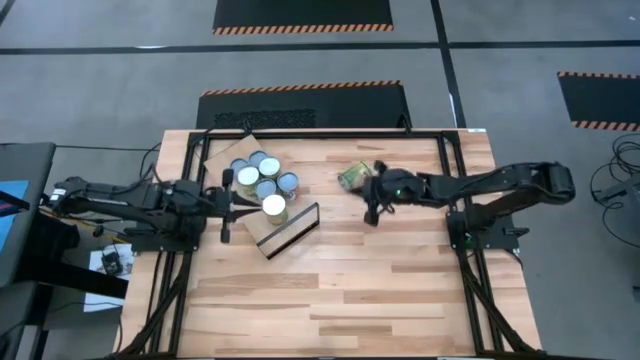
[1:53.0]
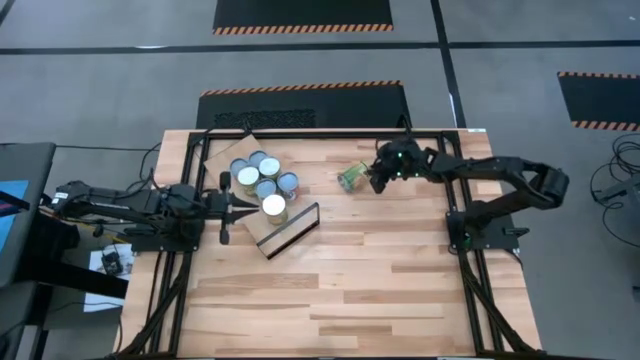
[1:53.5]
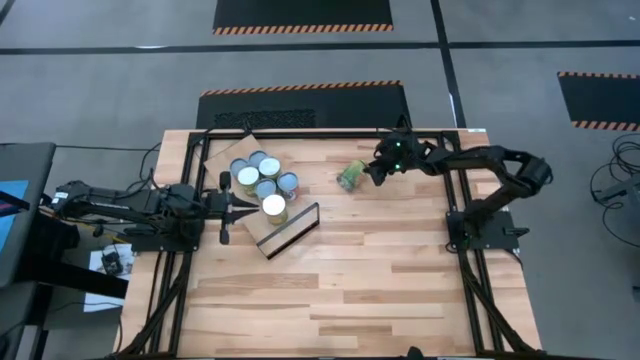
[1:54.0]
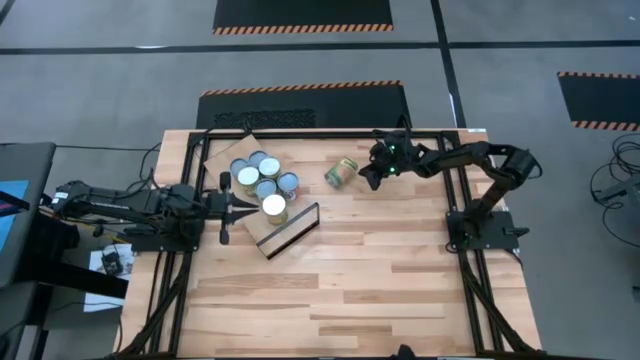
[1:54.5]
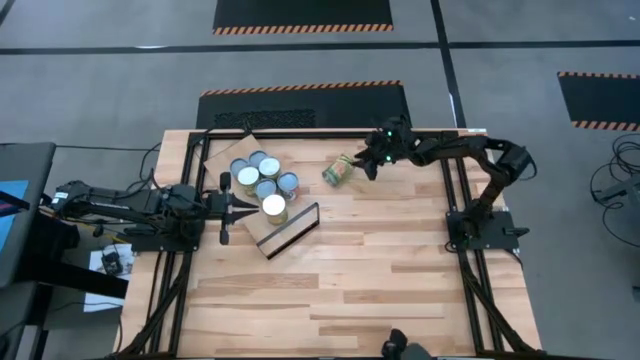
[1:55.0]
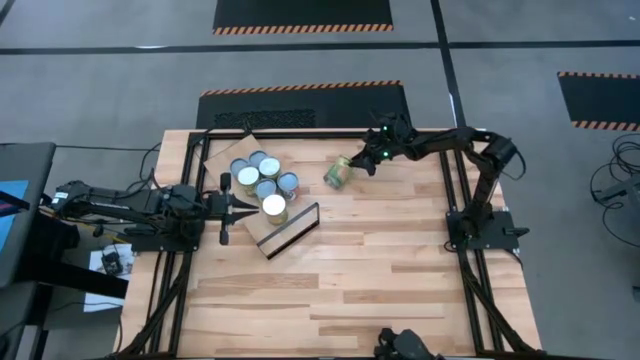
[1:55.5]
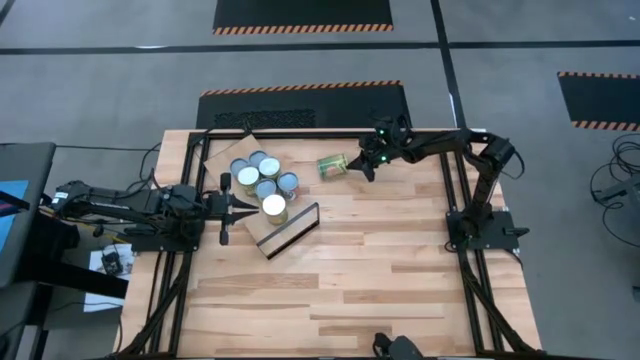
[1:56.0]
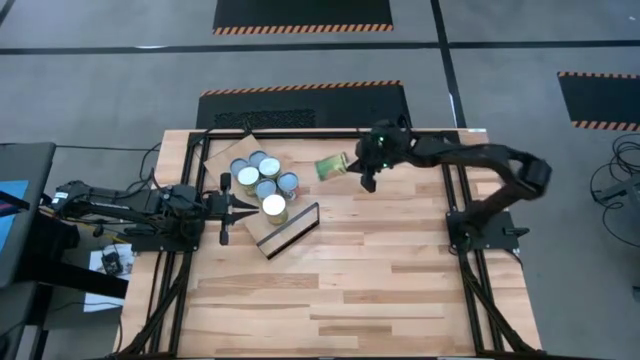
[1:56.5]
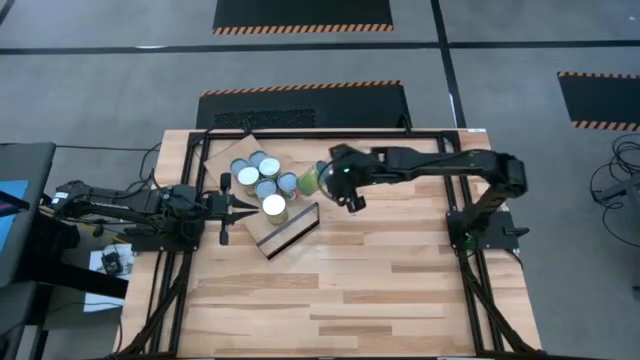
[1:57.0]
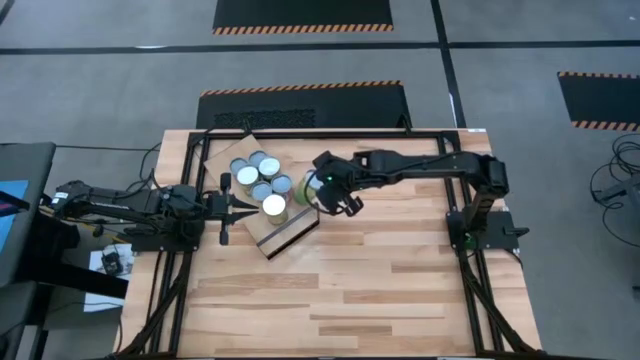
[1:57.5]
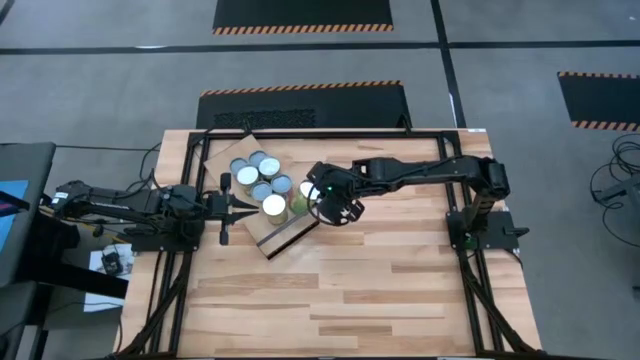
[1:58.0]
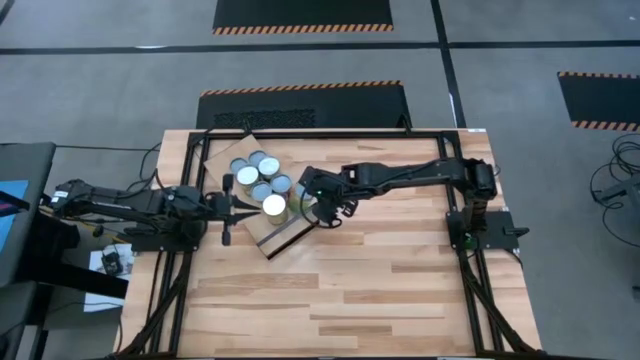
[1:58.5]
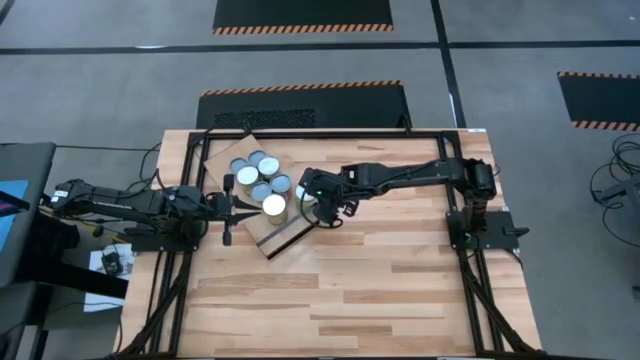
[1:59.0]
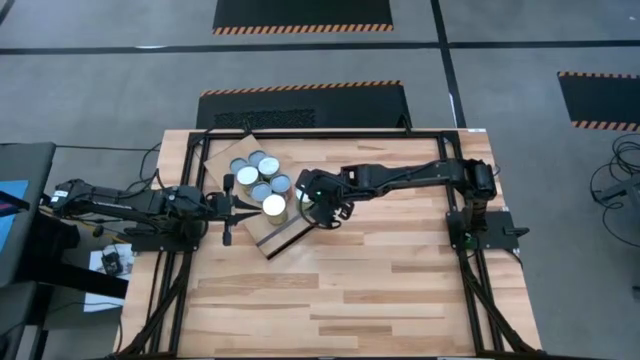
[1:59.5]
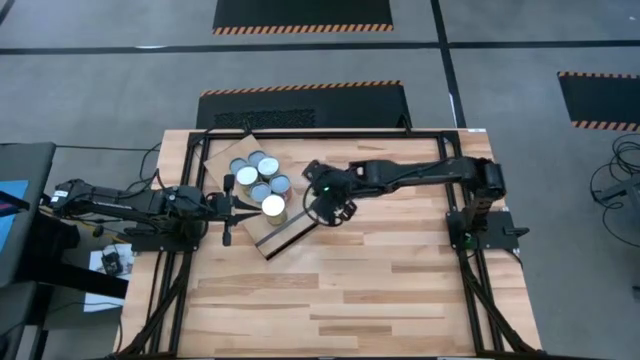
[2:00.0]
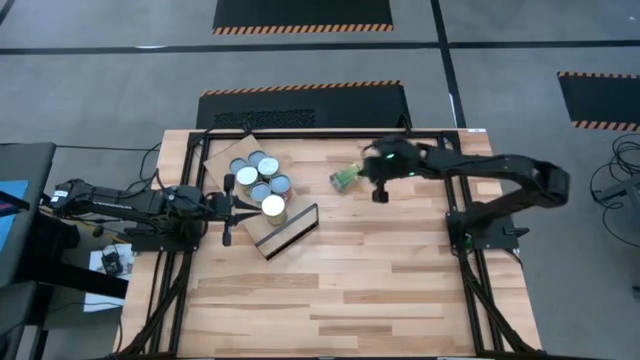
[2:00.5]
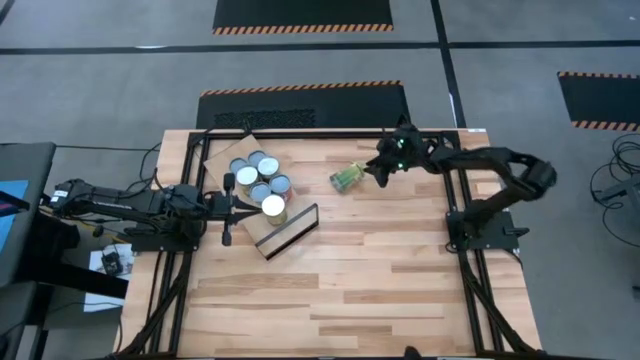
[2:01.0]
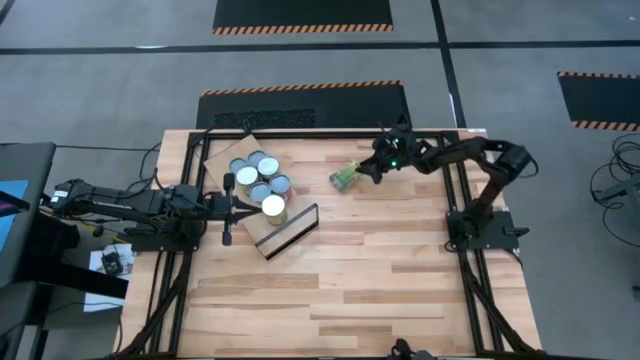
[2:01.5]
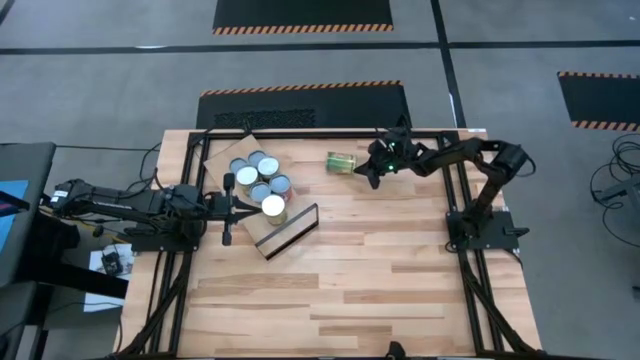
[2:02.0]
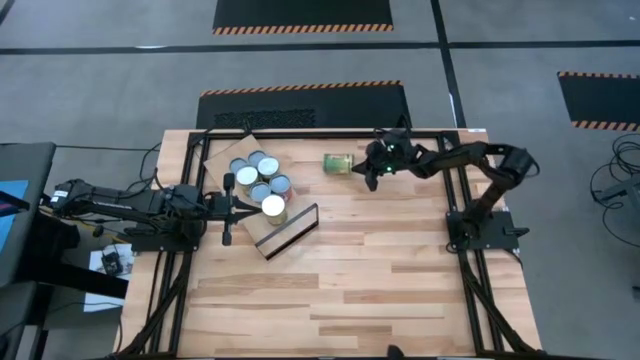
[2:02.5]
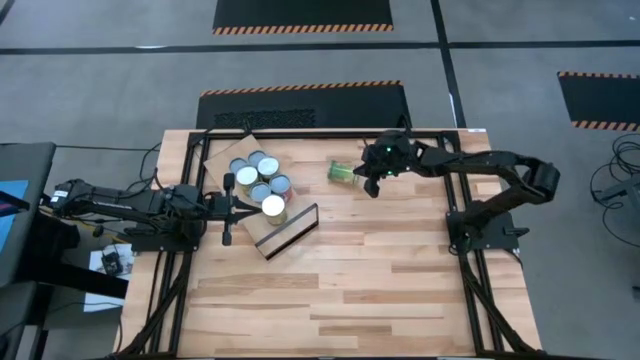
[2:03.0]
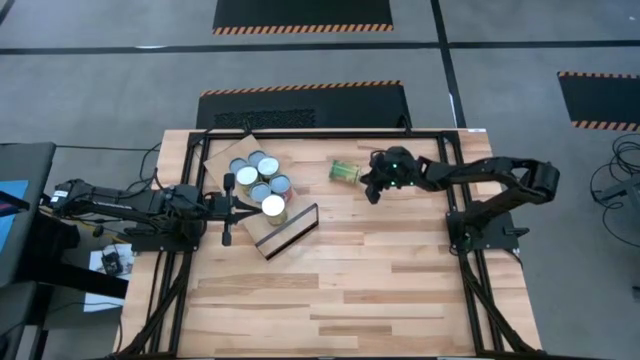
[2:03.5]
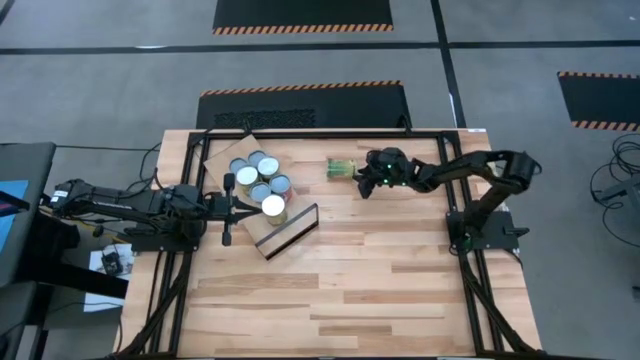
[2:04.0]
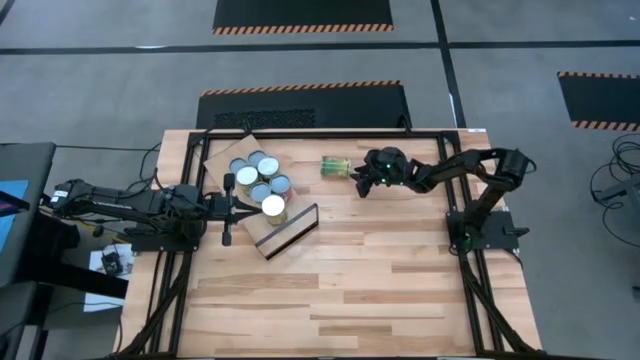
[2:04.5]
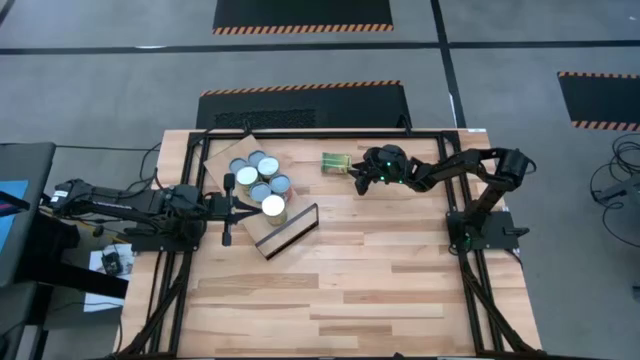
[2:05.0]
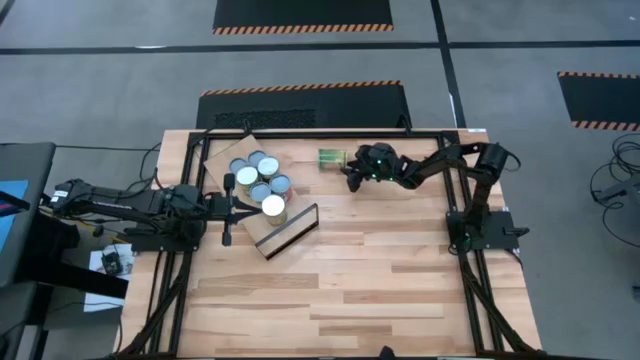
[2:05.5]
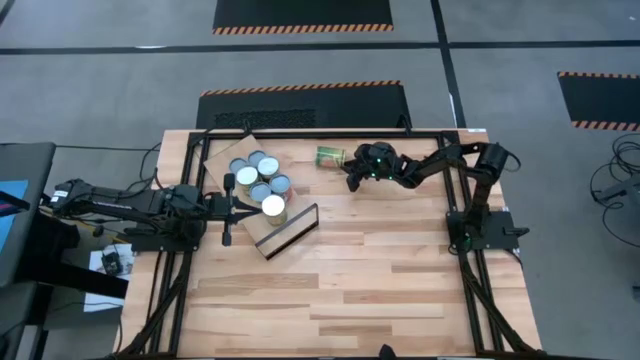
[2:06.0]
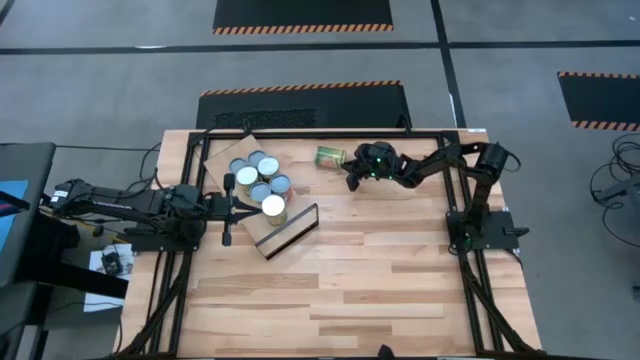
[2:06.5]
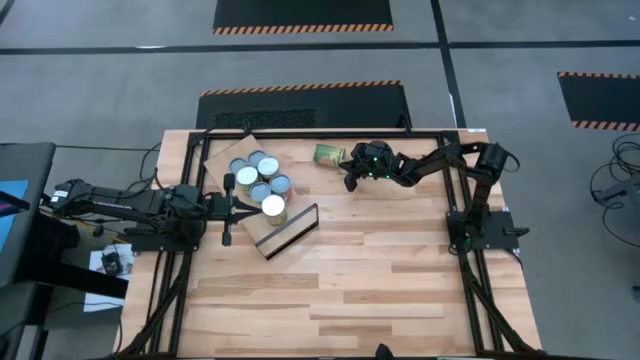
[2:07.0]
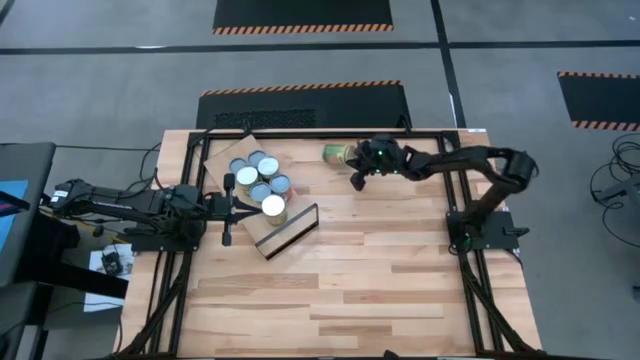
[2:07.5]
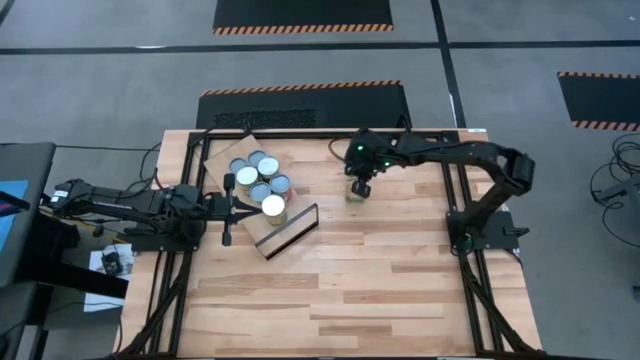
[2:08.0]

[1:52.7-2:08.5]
Task: Pick and place cans onto a shelf
Put the top large canned oranges on the shelf

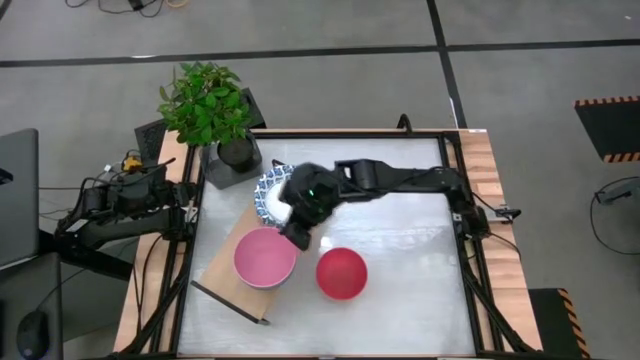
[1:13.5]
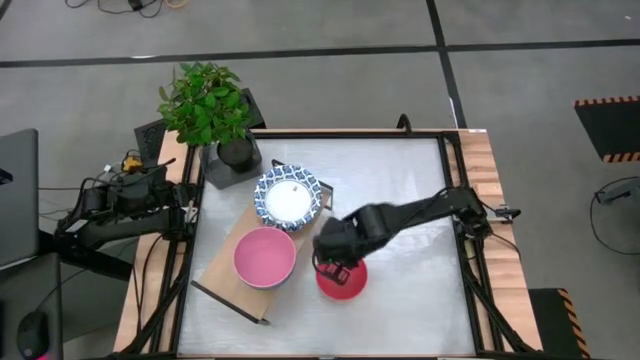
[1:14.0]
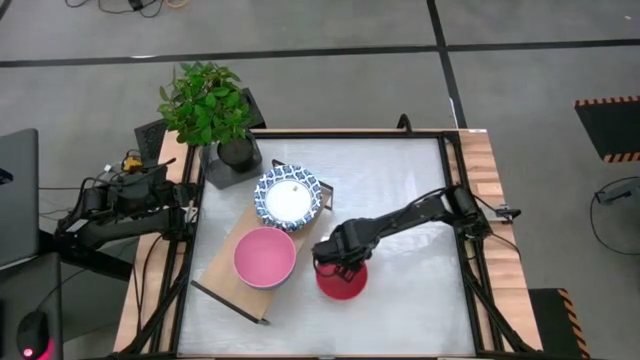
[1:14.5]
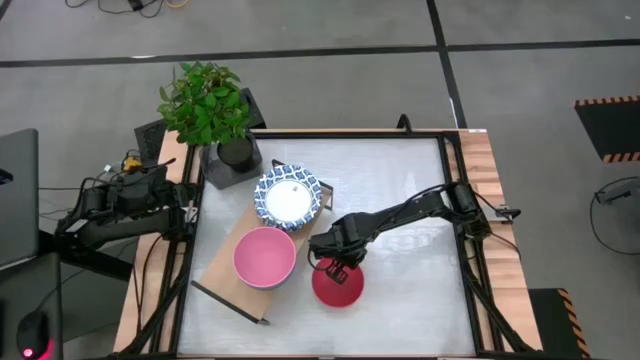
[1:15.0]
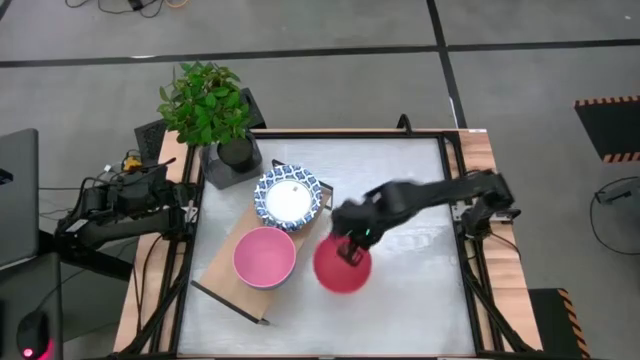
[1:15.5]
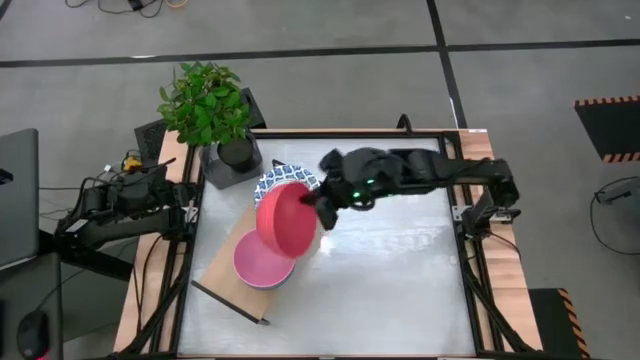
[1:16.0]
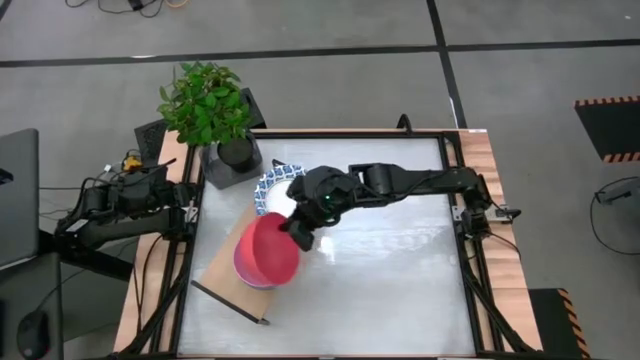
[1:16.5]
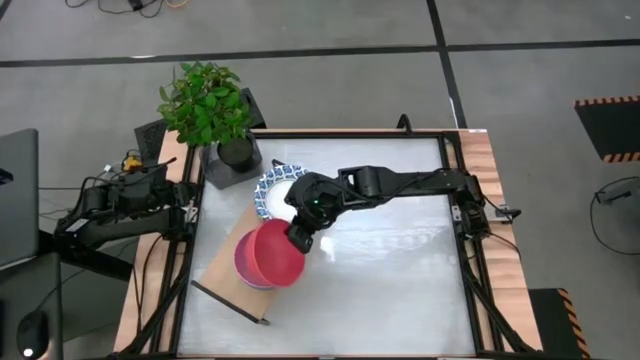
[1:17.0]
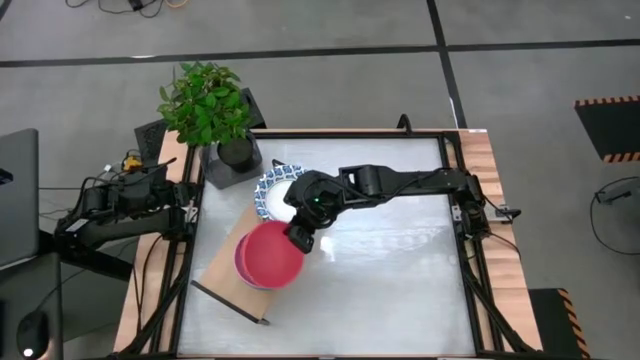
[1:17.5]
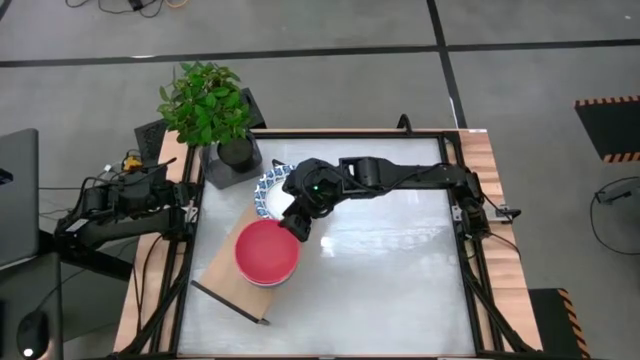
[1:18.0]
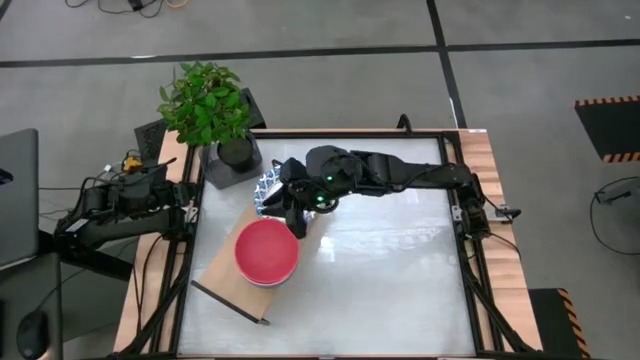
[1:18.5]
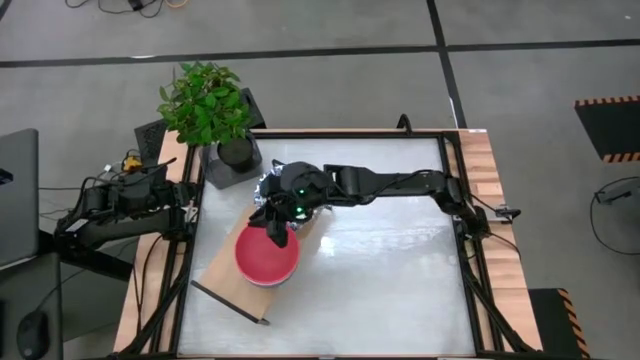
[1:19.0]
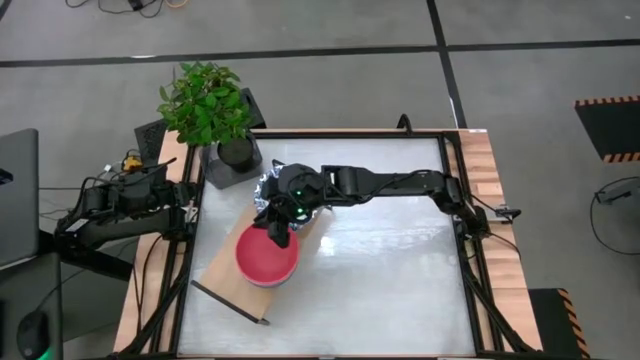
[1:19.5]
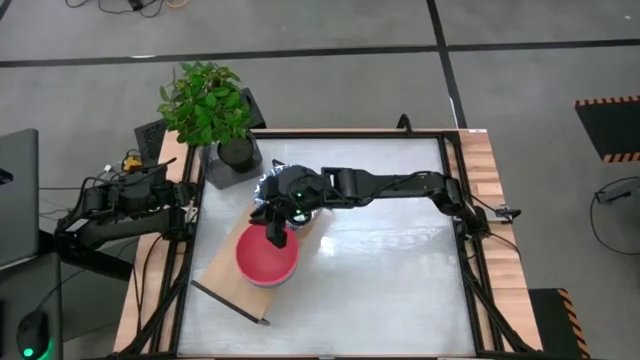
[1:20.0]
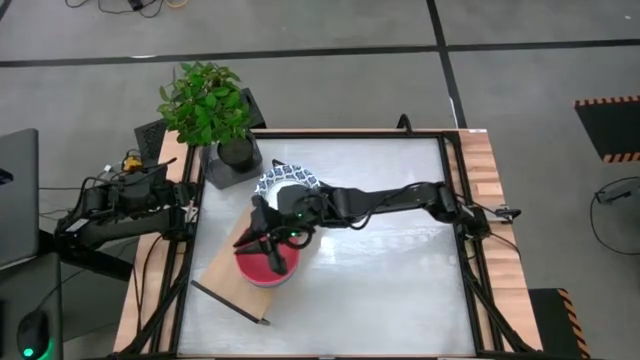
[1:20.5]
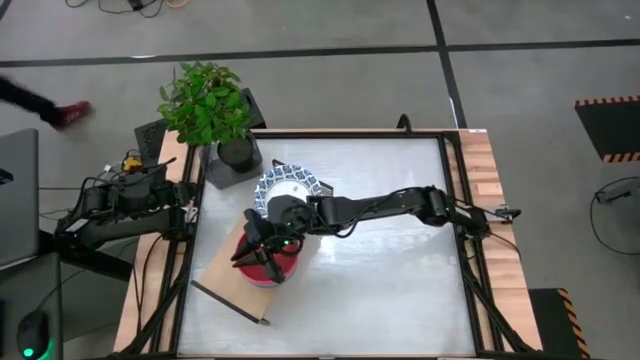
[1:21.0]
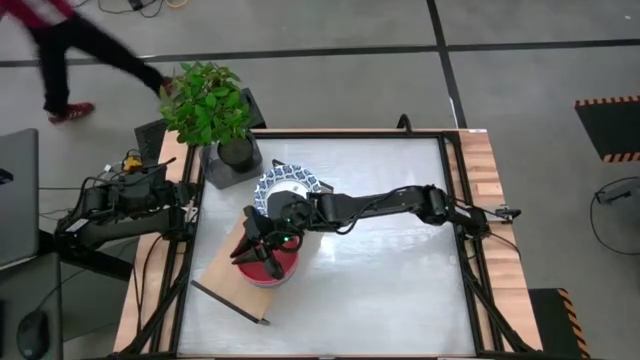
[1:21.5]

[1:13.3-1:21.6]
Task: Place and stack bowls onto a shelf
Stack the orange bowl on the pink bowl on the shelf
